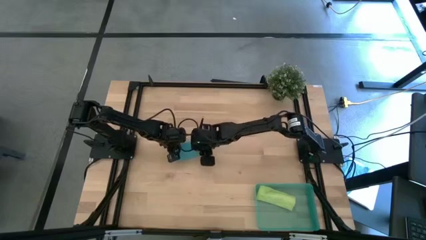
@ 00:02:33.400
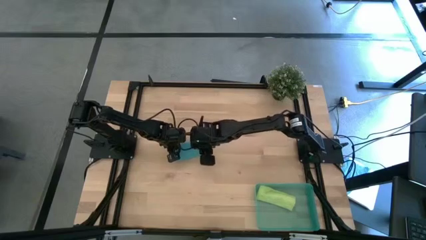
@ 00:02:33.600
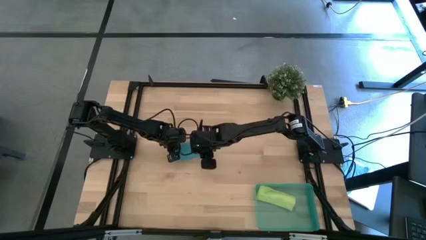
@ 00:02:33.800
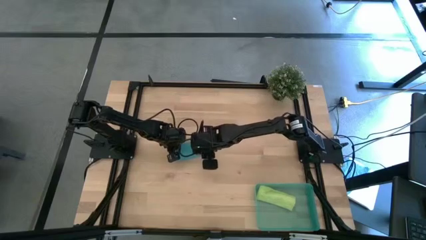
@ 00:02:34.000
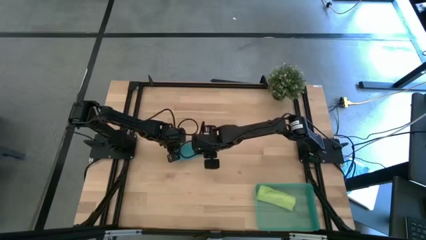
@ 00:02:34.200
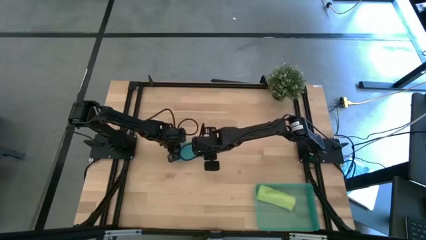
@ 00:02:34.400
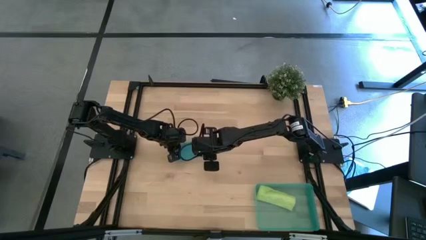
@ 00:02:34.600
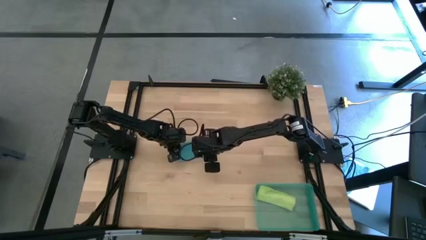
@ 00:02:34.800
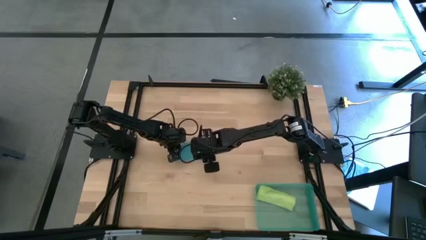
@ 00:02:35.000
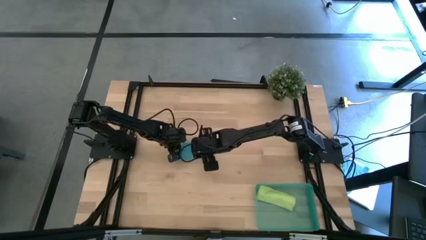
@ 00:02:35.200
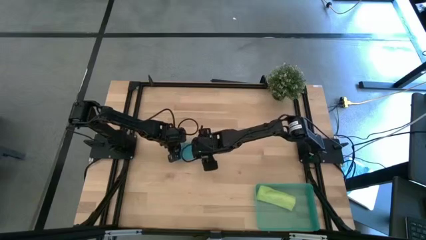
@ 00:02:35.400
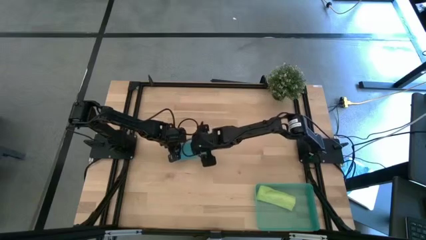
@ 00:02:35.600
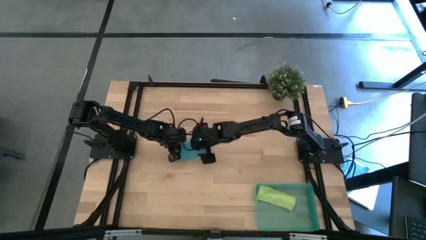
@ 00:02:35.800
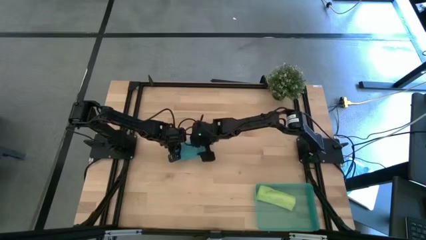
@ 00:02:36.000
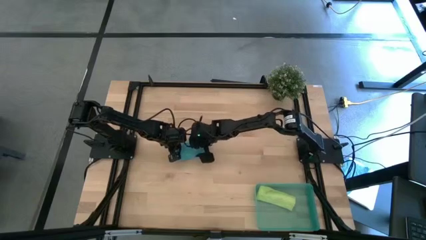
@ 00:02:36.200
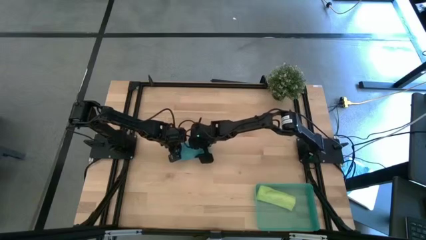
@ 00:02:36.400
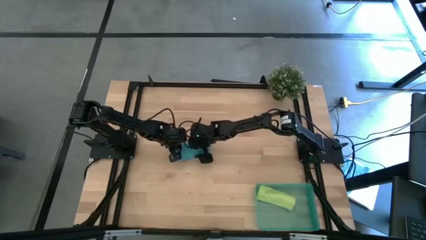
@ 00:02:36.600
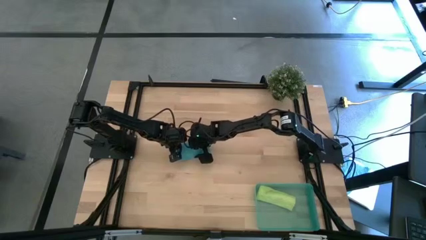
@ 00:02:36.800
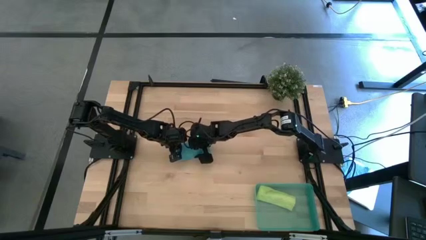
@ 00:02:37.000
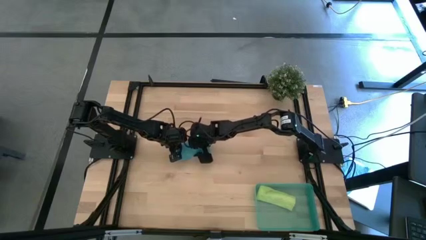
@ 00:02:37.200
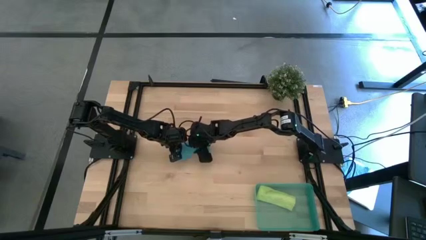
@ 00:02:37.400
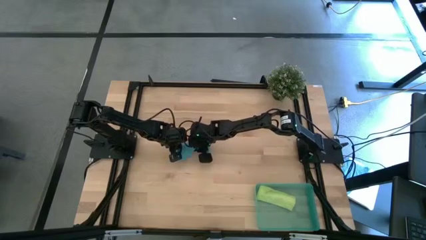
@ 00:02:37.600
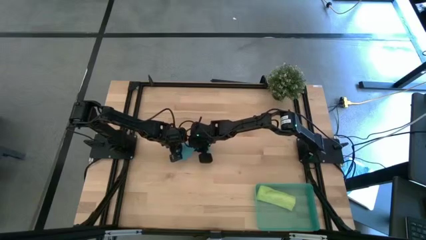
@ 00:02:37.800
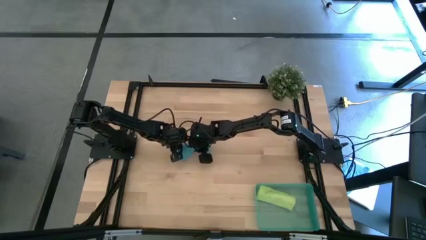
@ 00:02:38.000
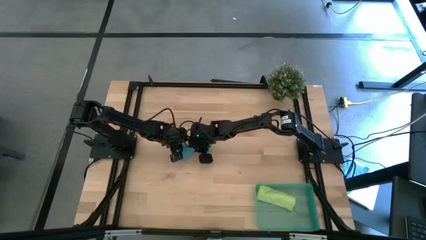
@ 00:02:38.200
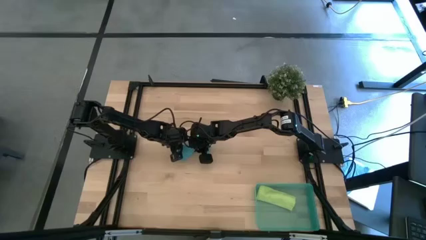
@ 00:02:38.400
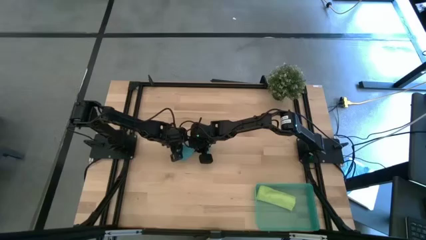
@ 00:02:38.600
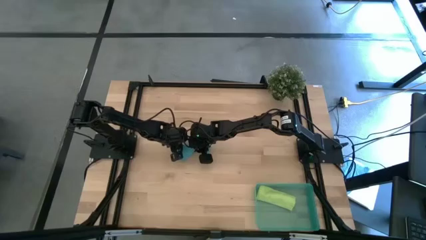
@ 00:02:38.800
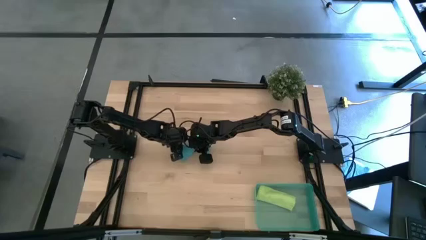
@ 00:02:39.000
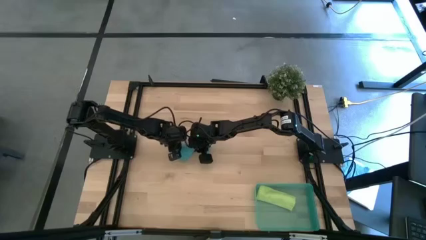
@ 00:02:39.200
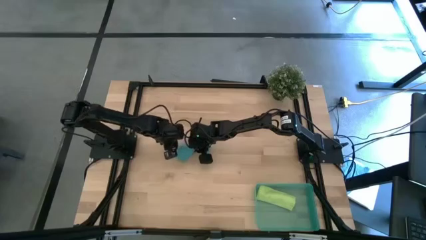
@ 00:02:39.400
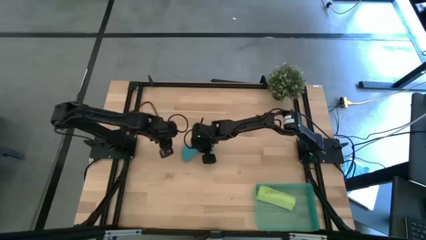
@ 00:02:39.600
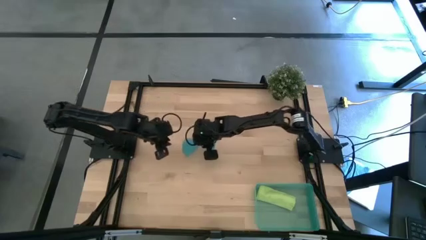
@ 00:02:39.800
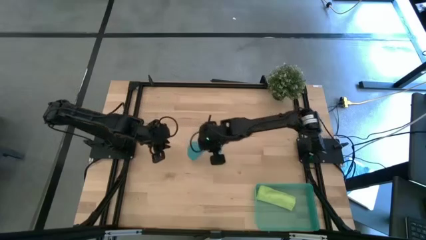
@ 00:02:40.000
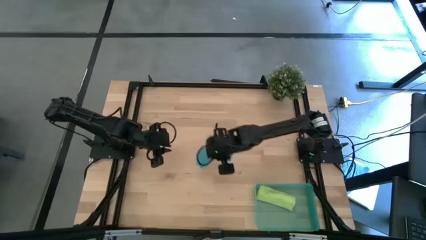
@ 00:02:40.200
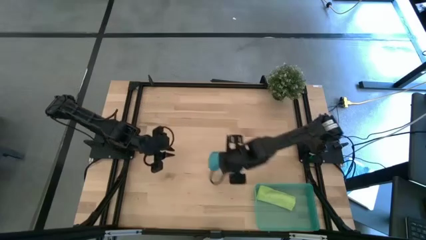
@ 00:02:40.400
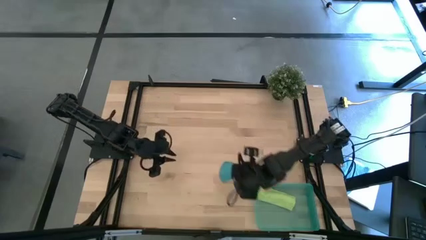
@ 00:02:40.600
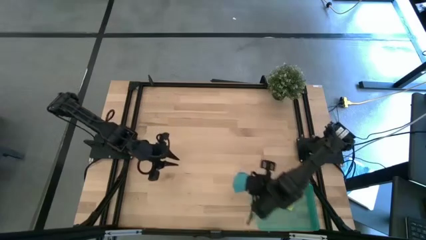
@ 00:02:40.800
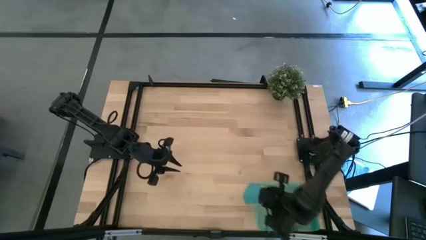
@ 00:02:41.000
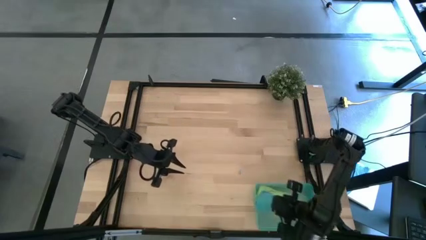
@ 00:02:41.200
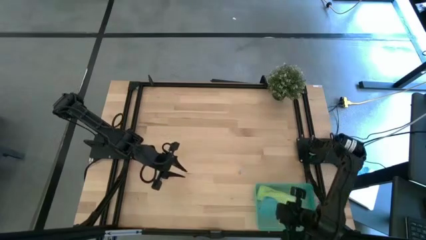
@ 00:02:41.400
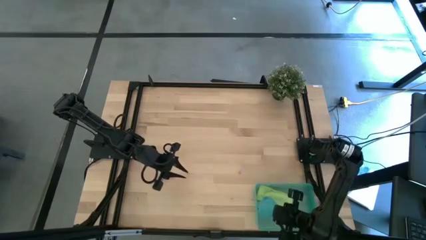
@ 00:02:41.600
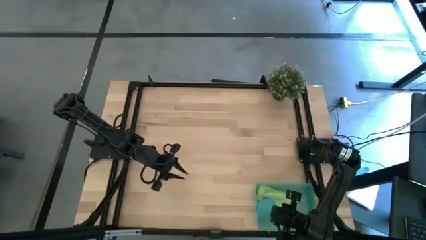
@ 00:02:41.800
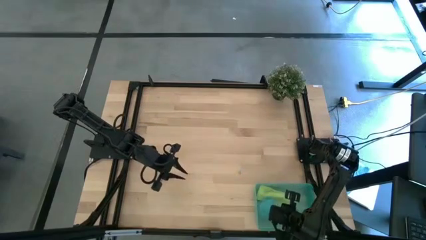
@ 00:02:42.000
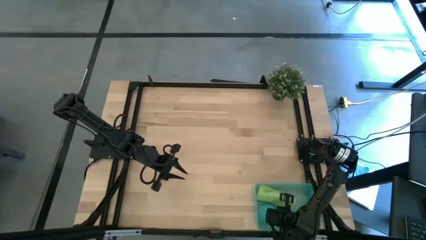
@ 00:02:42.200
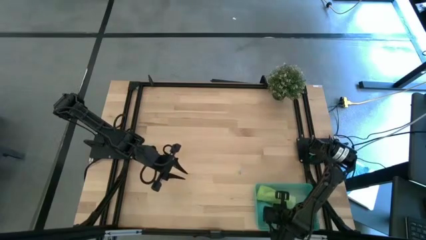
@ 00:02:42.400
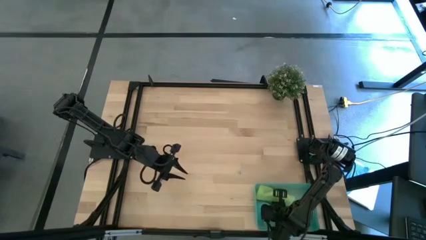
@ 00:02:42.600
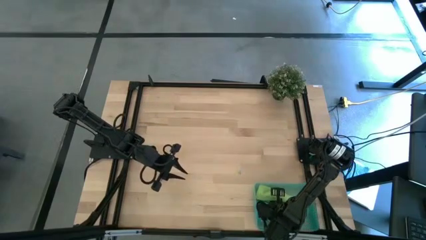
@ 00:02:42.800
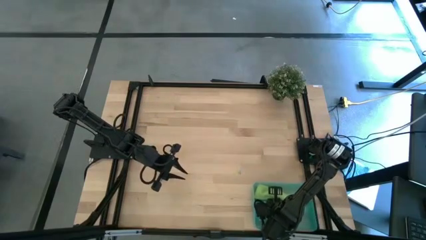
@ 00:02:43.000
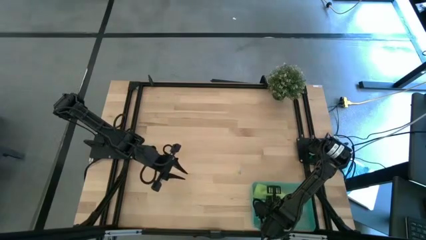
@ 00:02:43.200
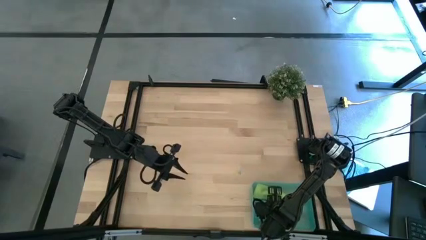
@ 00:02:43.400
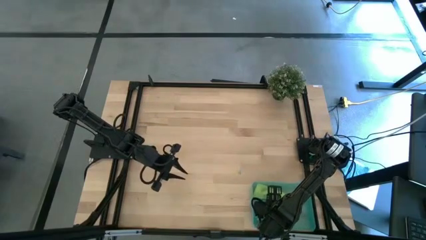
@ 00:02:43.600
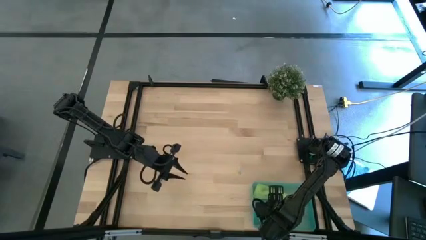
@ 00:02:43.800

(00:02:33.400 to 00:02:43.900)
Task: Roll microfiber towels into tight, uniform cylinder then place into a basket
Put the blue rolled microfiber cloth into the green bin

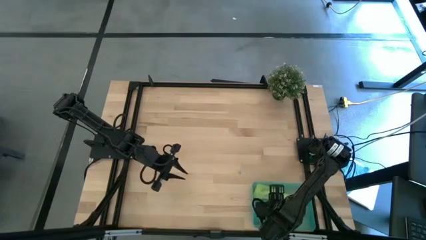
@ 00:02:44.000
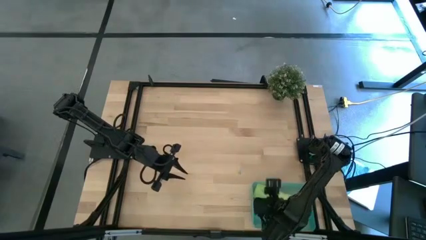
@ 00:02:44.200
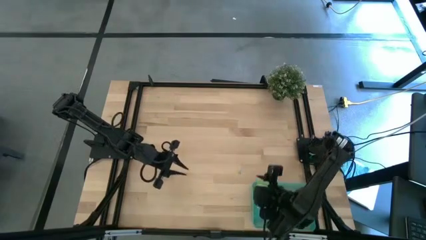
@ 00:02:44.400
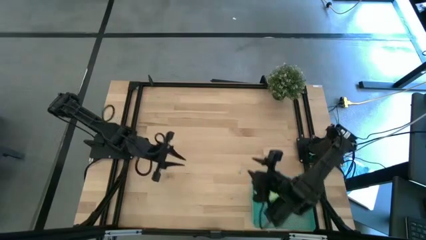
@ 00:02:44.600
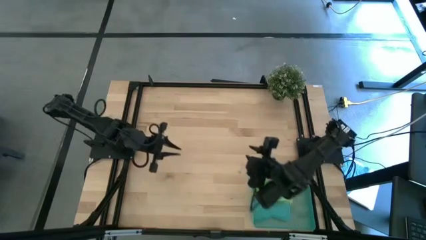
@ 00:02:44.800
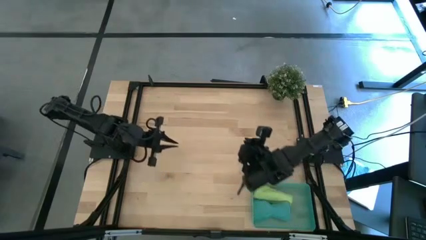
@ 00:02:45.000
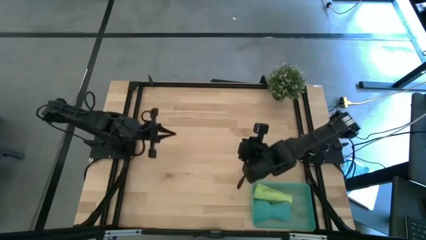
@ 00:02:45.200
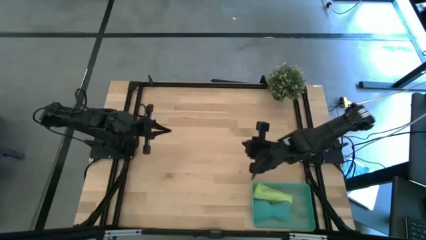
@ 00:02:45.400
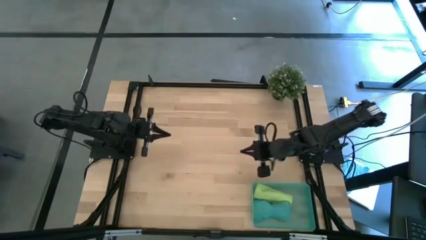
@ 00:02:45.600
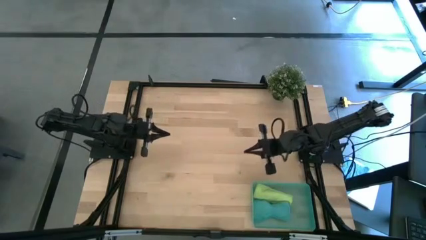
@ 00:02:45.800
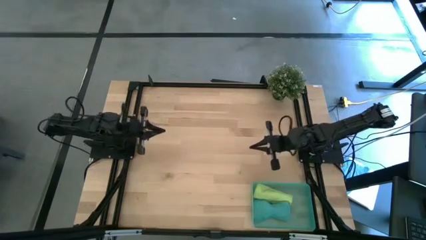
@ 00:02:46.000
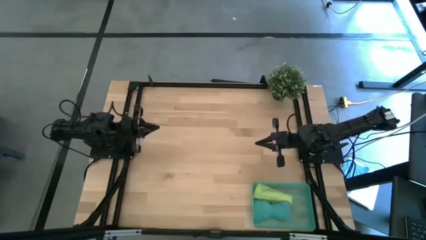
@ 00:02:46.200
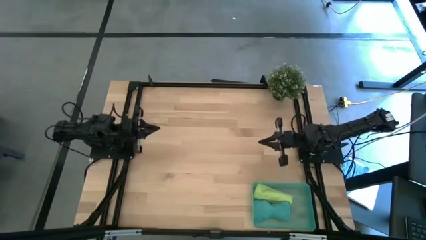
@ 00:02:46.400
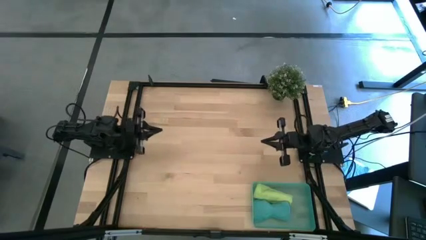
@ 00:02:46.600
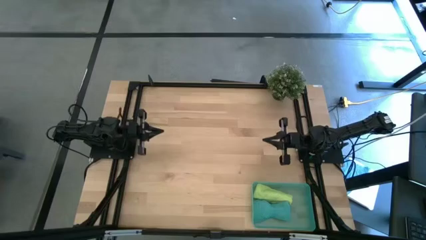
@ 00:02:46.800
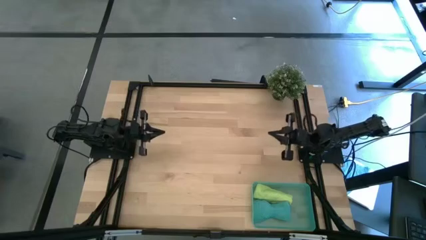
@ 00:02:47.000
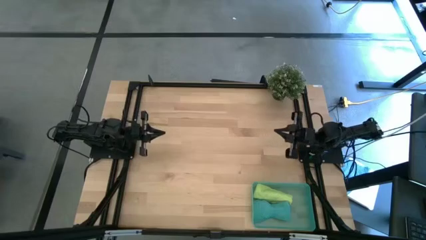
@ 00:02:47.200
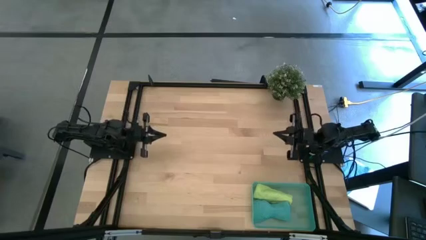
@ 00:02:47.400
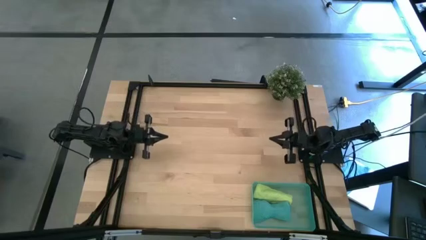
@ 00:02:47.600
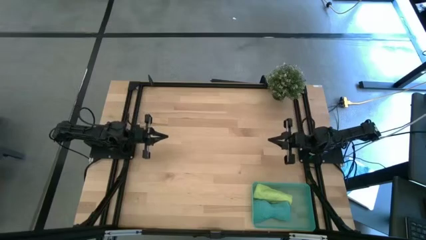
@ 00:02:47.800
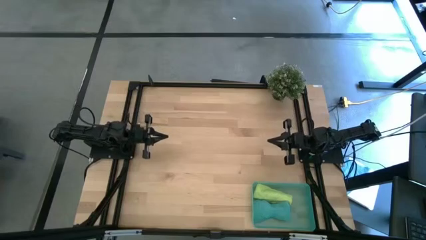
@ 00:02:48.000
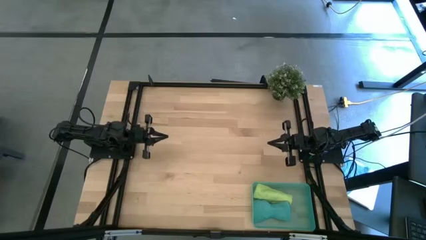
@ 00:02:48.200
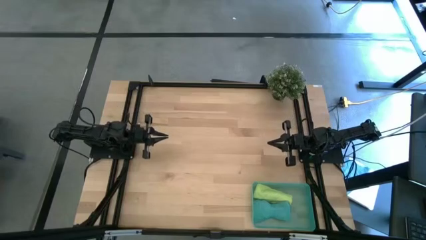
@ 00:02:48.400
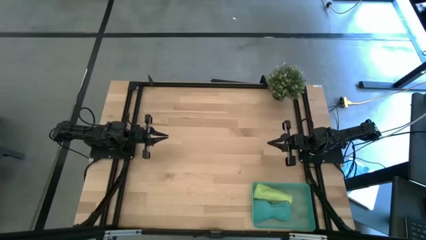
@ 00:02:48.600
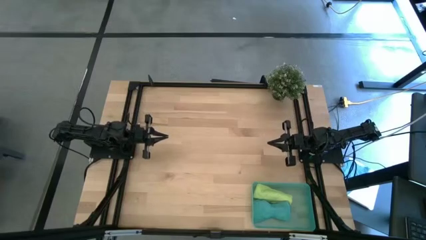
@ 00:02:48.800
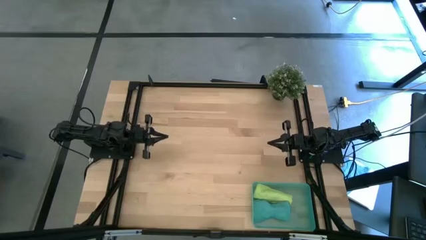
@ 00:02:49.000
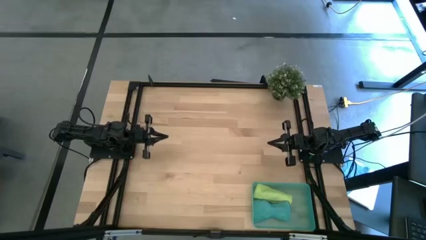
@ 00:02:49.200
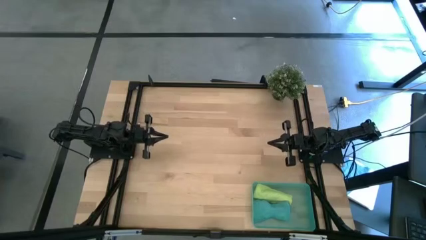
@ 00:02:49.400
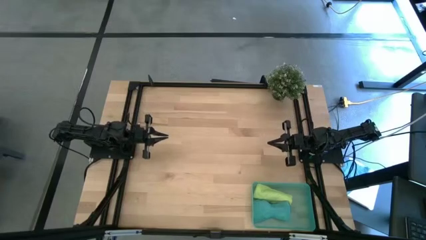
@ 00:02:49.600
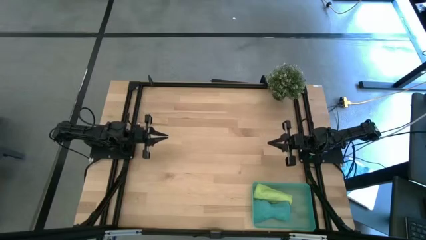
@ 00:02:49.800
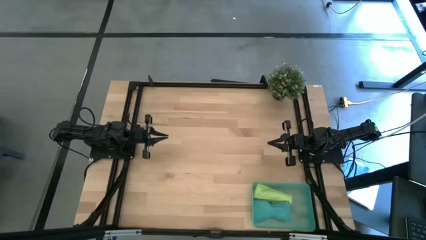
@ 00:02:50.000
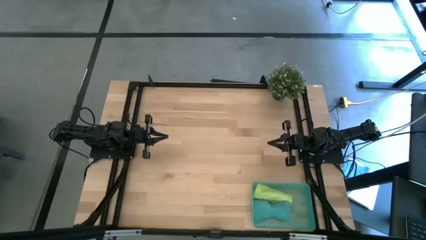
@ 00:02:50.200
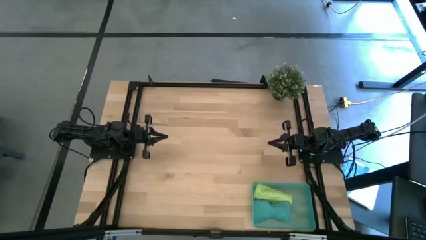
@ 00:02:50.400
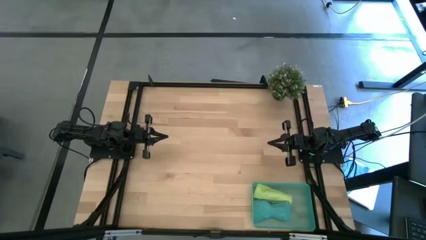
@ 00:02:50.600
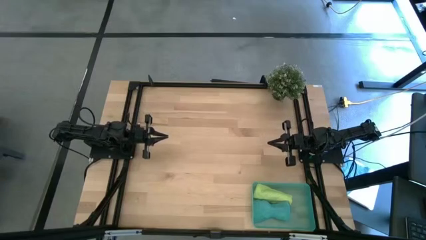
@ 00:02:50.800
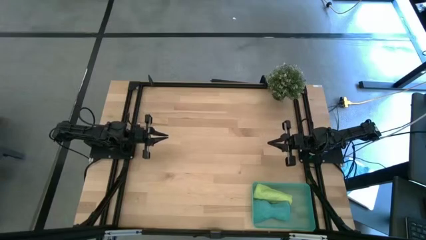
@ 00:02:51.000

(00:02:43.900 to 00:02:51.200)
Return to Home Position
